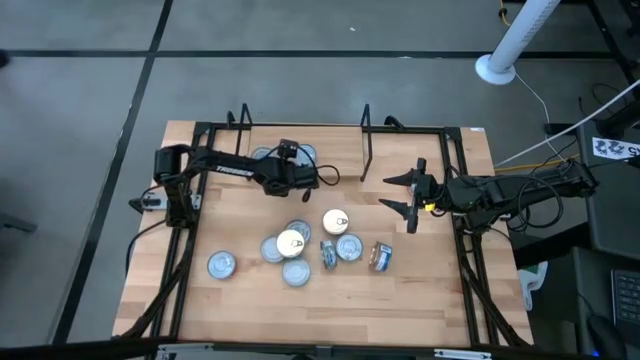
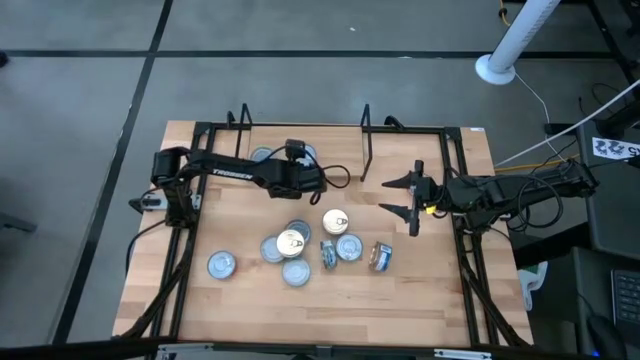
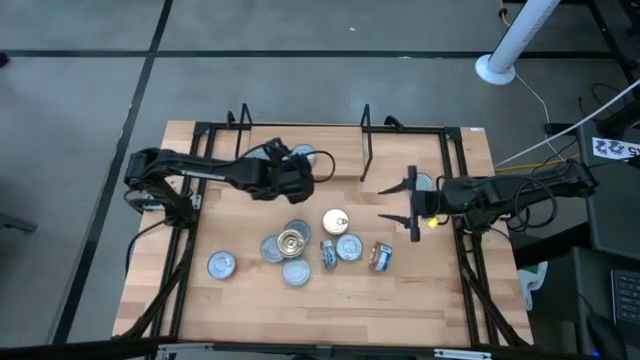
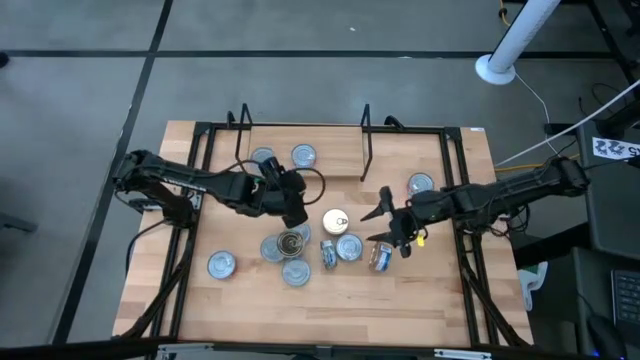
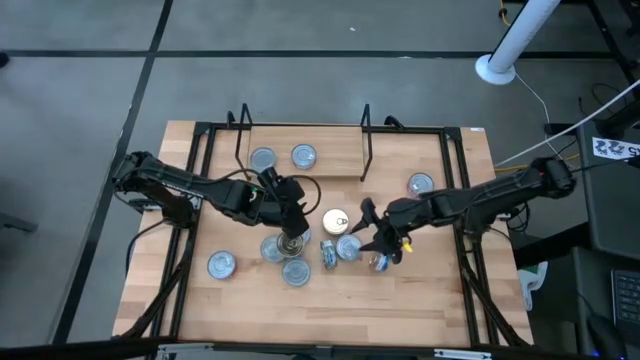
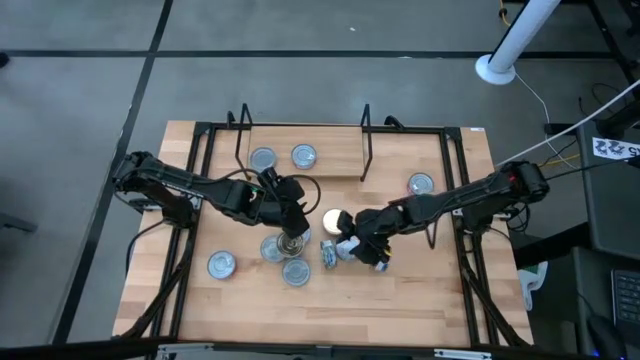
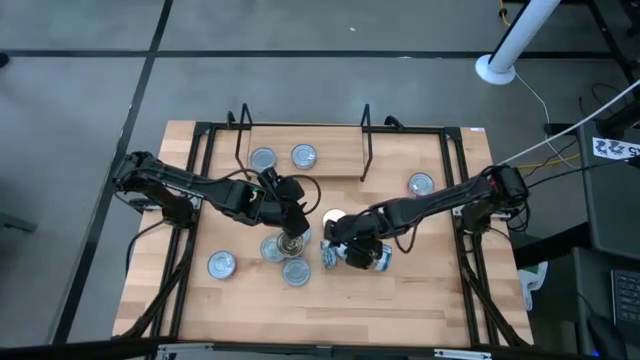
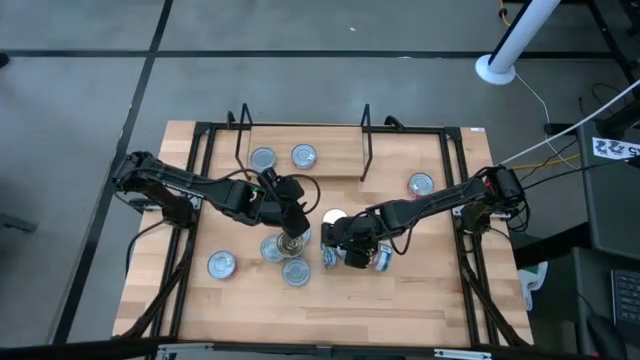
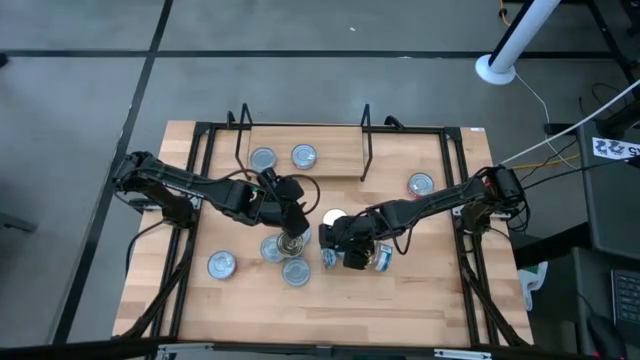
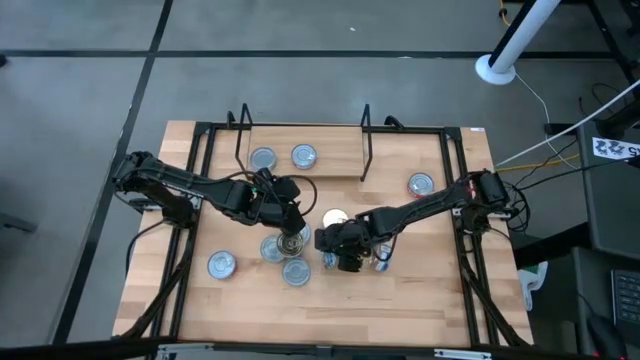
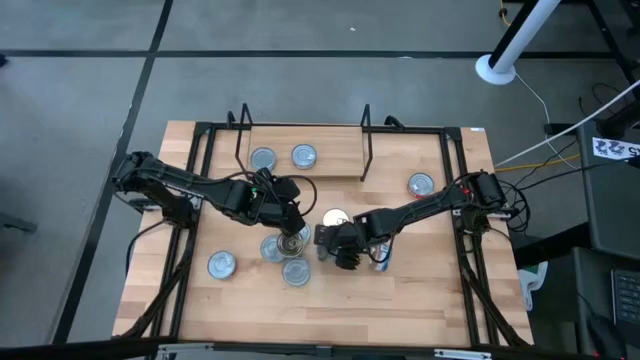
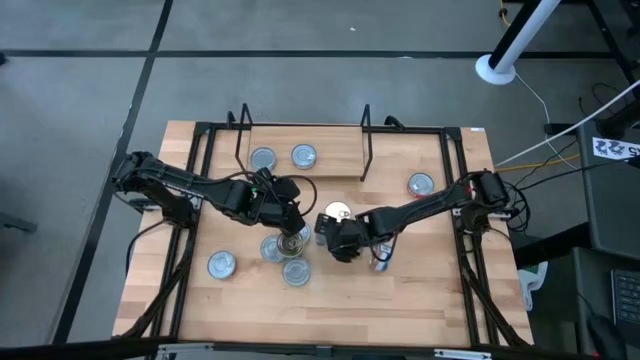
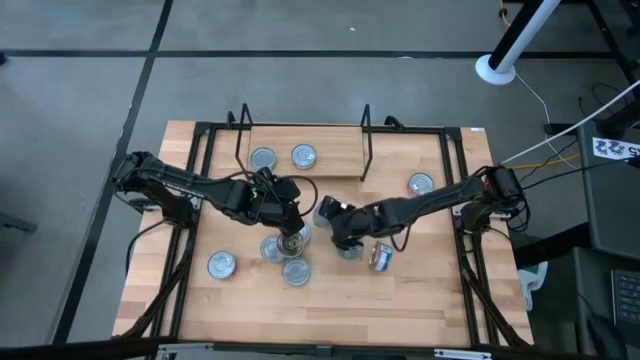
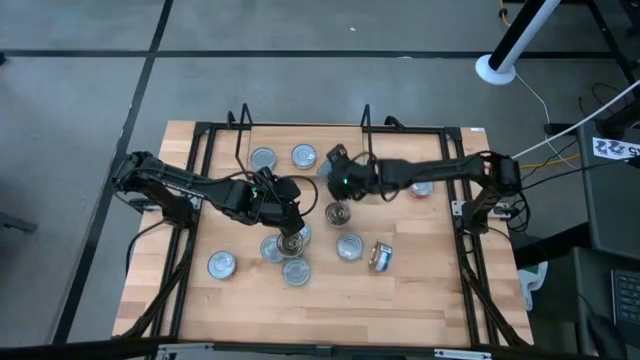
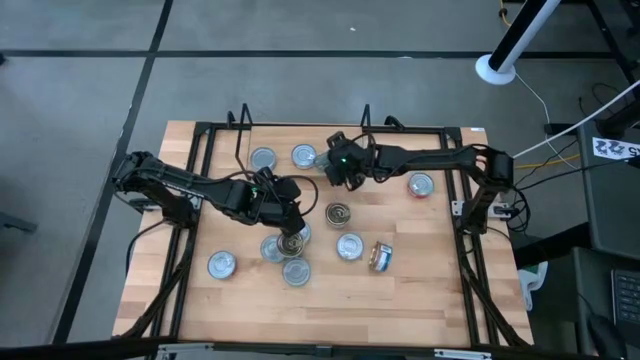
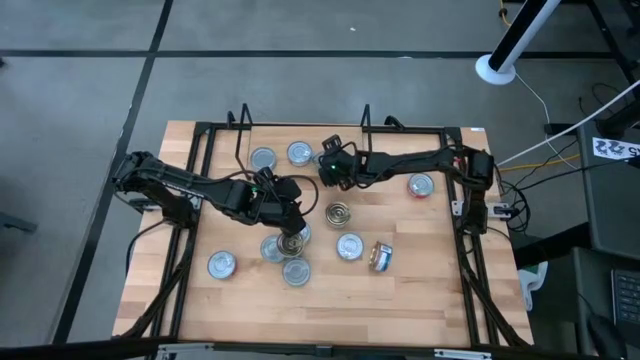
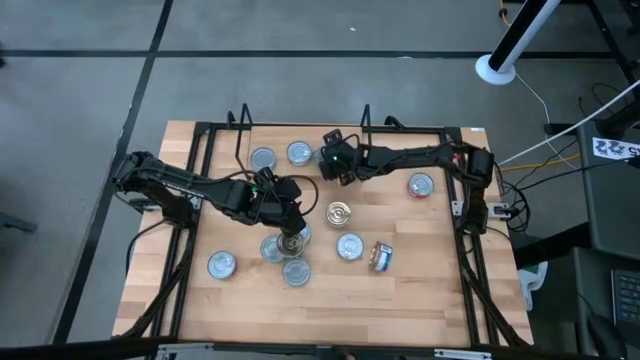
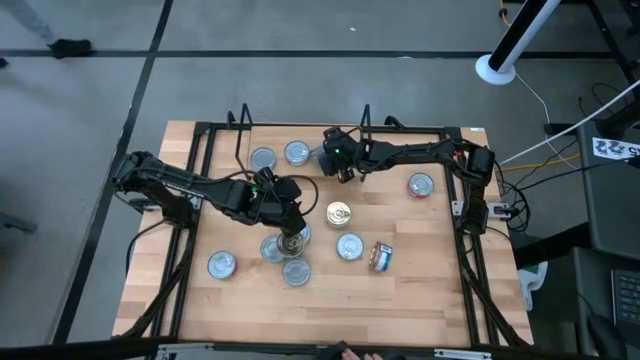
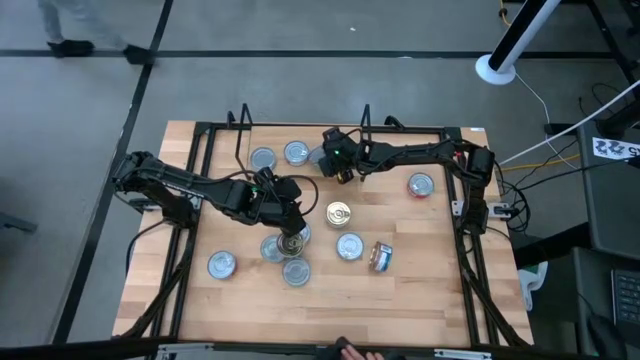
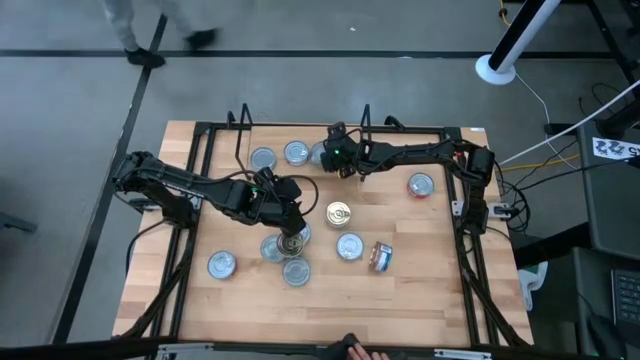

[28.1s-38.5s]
Task: Stack canned seafood by type on shelf
Put the green tuna can on the shelf

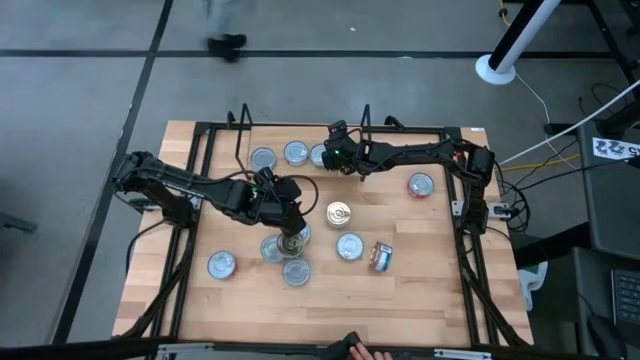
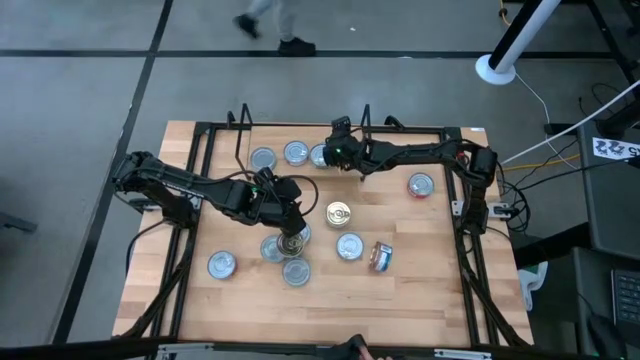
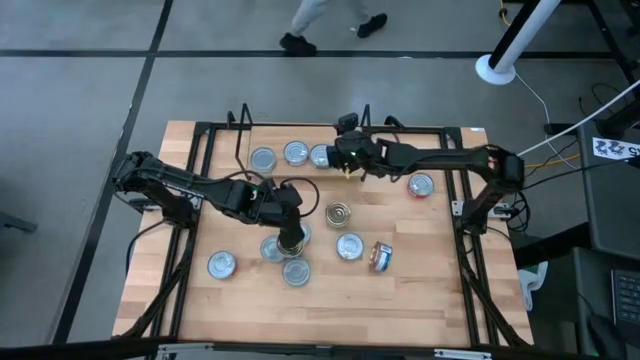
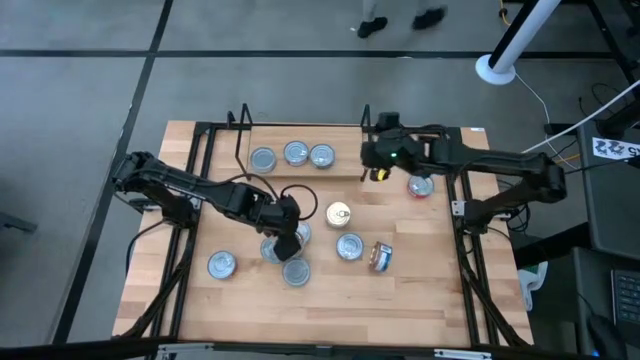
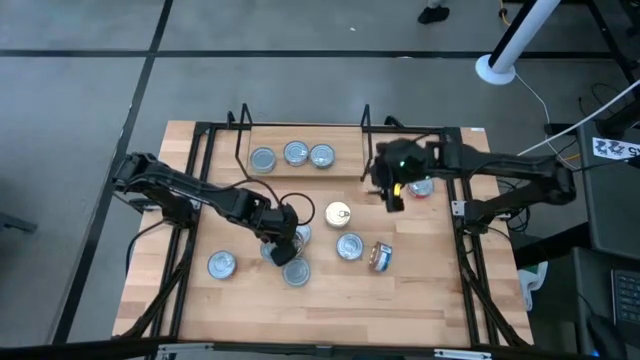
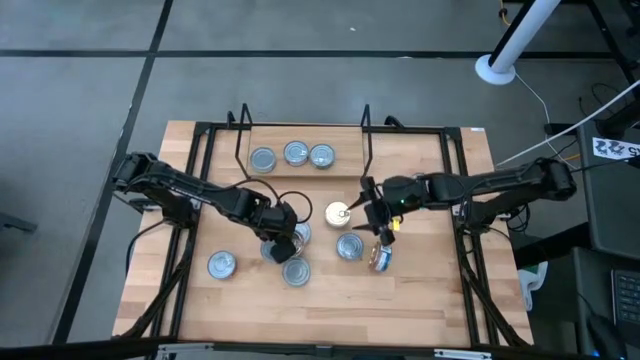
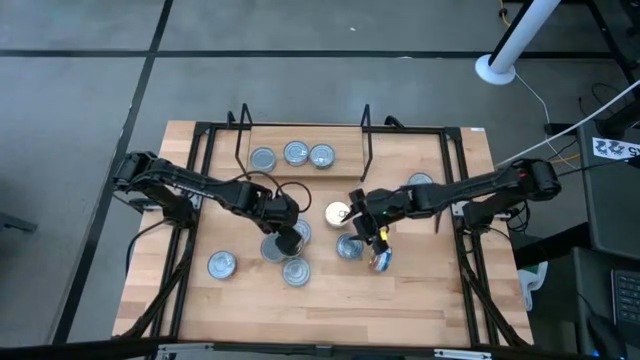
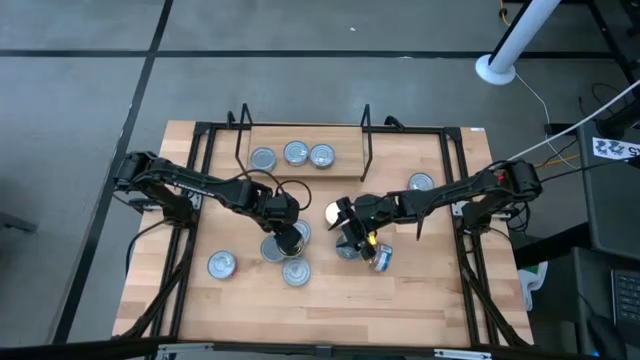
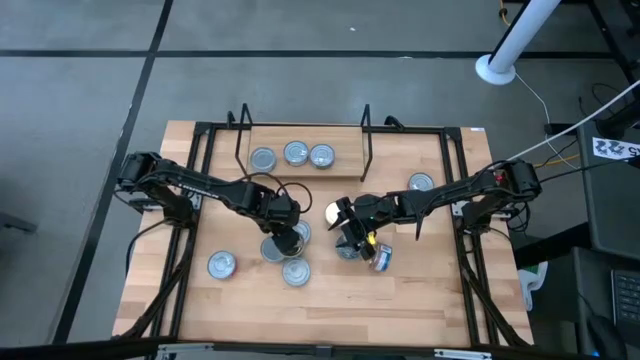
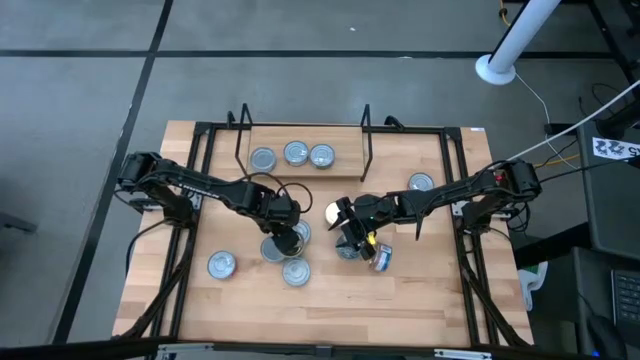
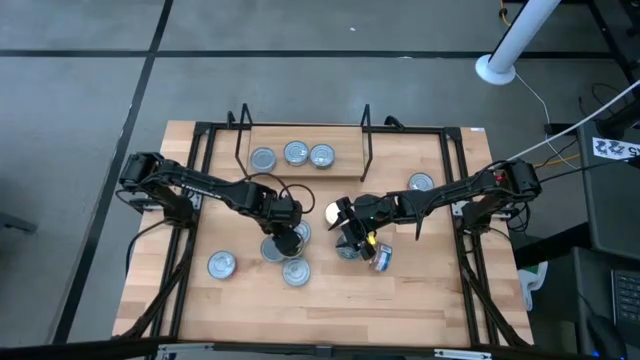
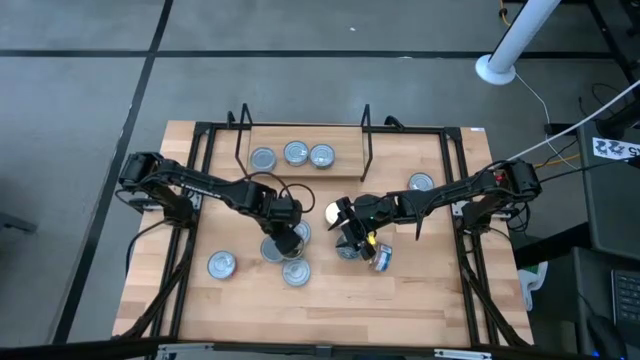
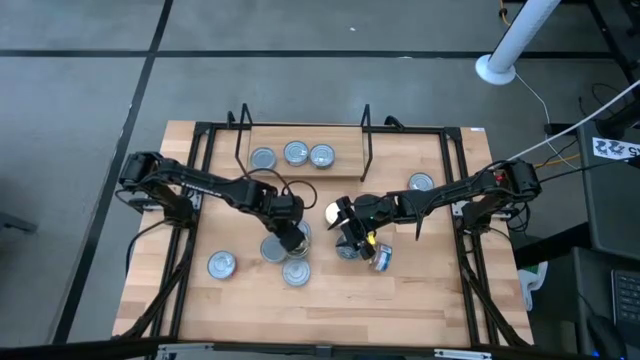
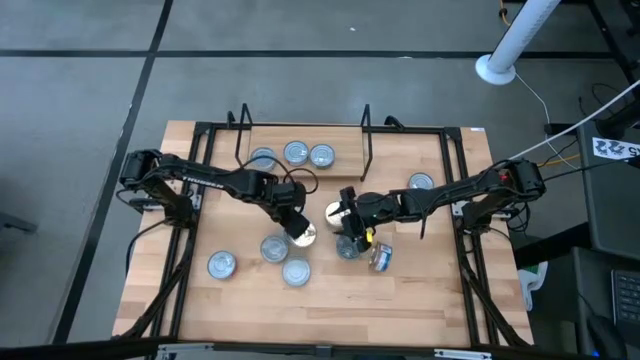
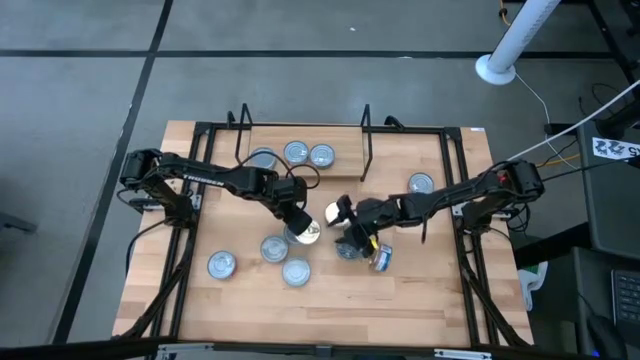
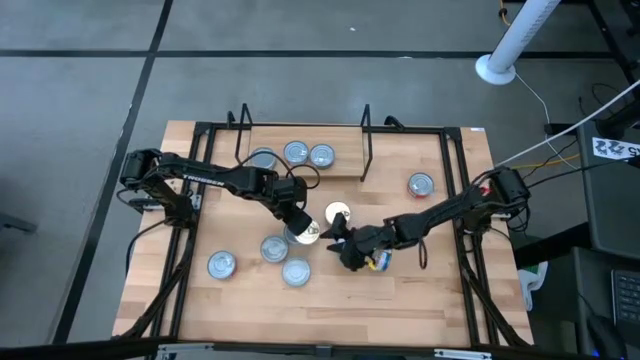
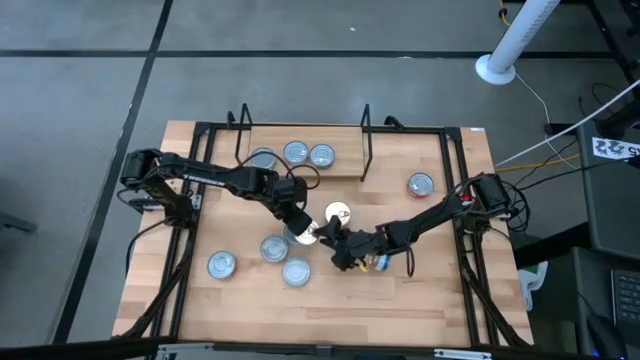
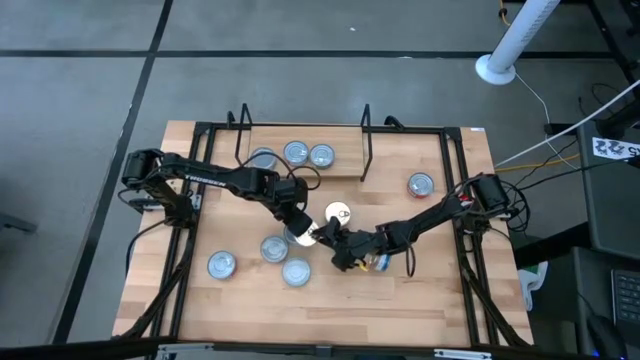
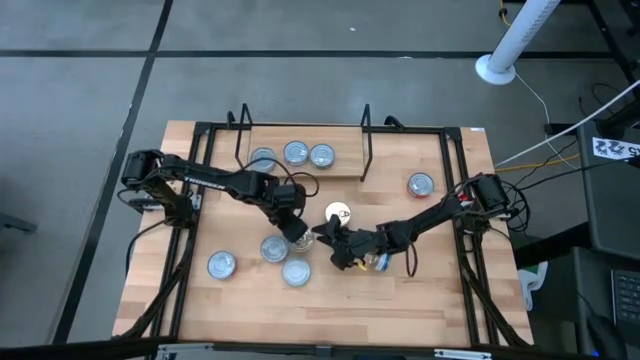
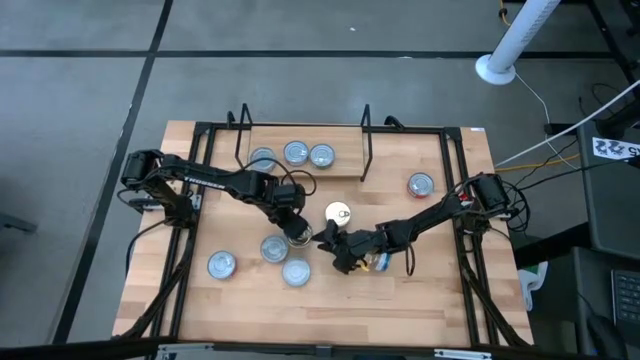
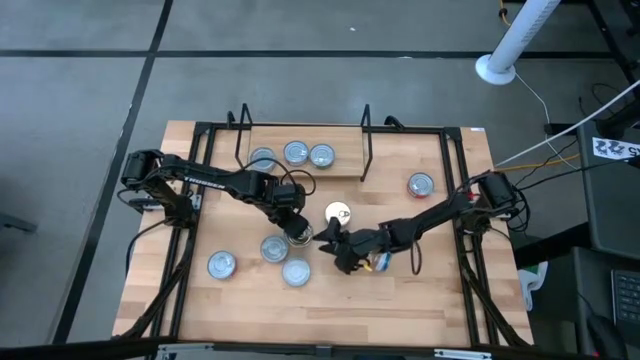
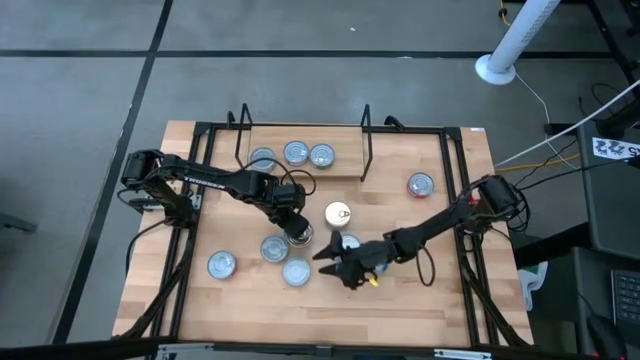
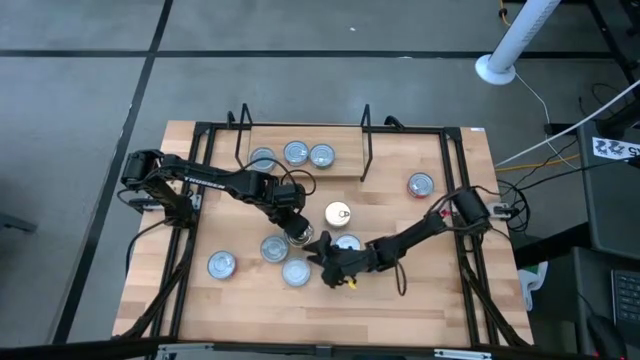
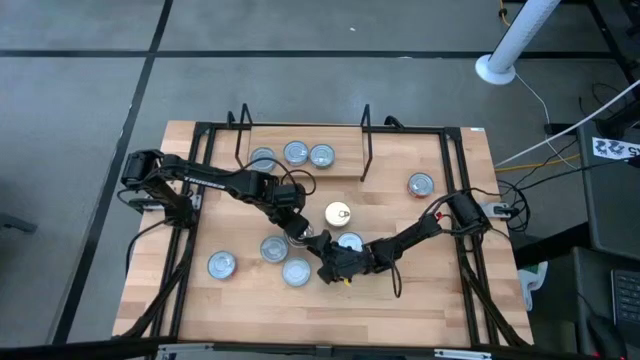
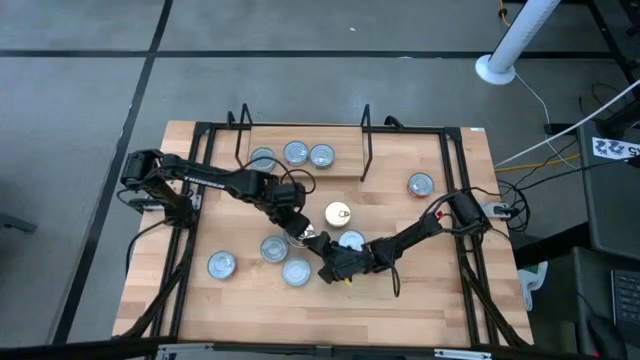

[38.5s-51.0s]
Put the blue-pink tuna can on the shelf
